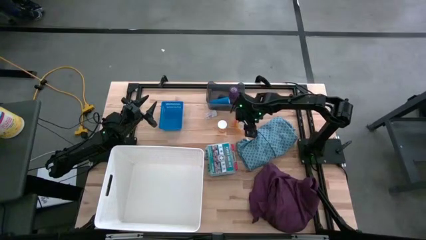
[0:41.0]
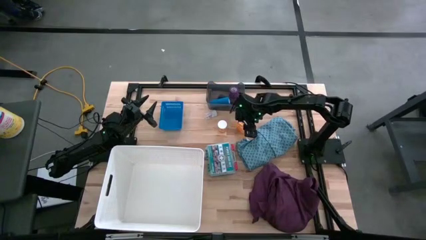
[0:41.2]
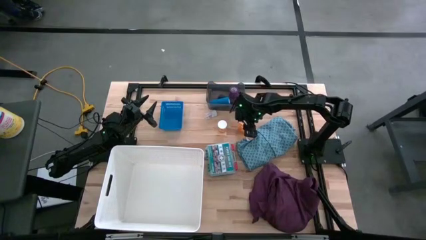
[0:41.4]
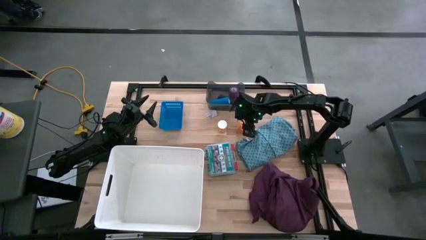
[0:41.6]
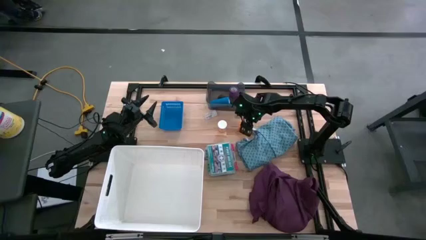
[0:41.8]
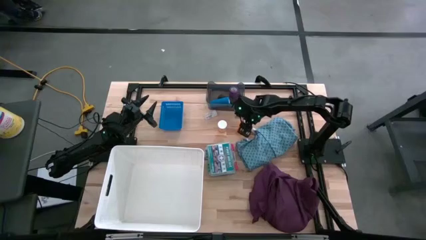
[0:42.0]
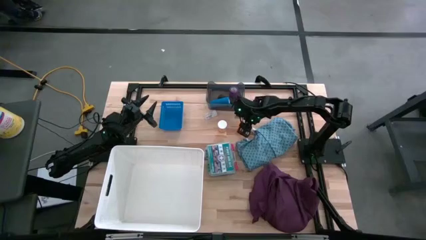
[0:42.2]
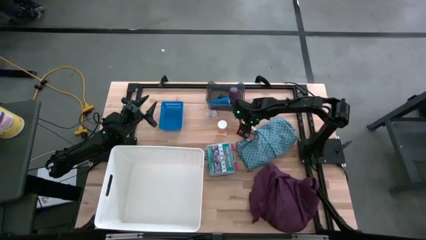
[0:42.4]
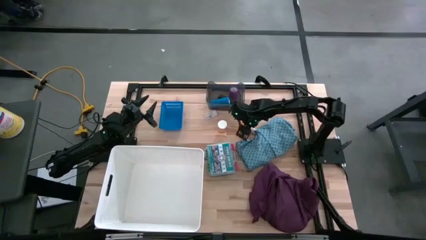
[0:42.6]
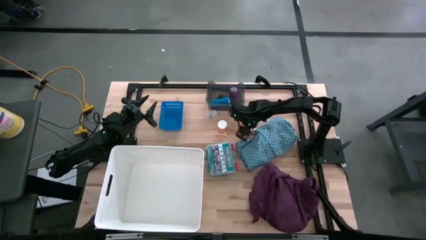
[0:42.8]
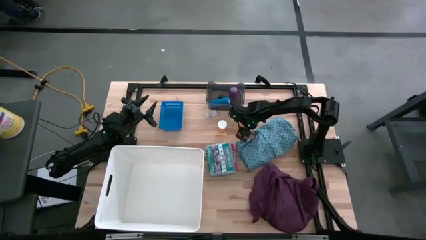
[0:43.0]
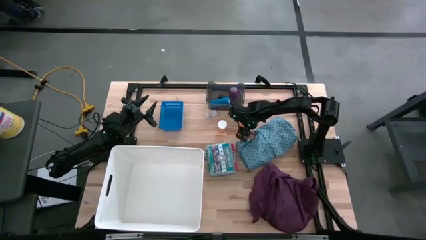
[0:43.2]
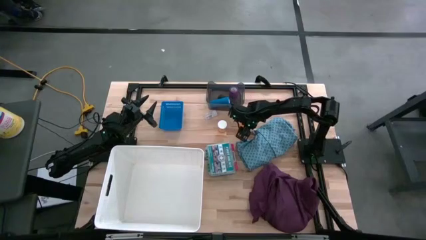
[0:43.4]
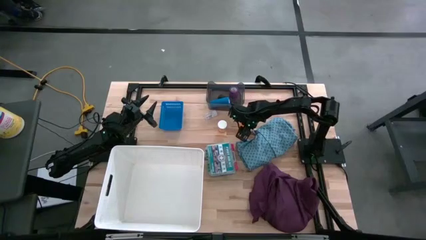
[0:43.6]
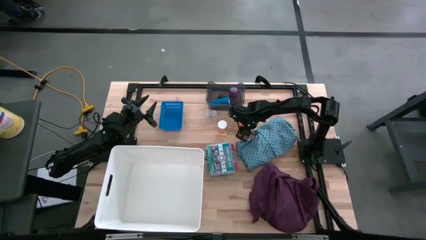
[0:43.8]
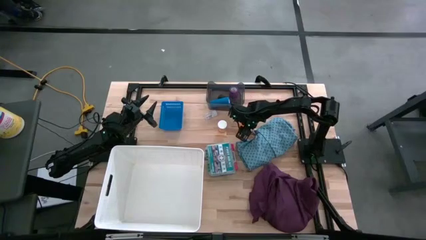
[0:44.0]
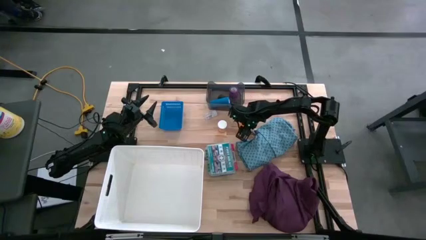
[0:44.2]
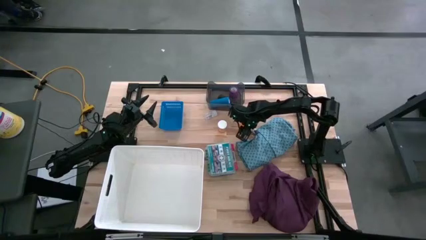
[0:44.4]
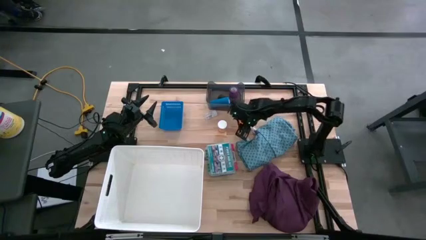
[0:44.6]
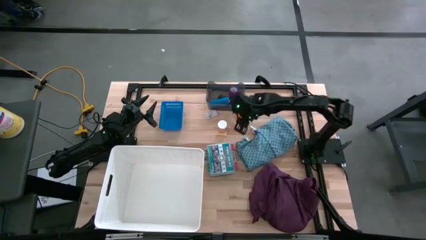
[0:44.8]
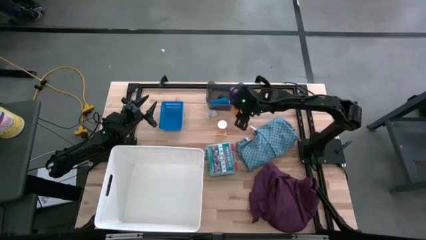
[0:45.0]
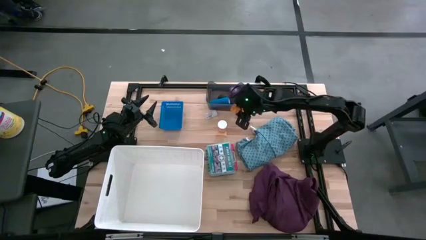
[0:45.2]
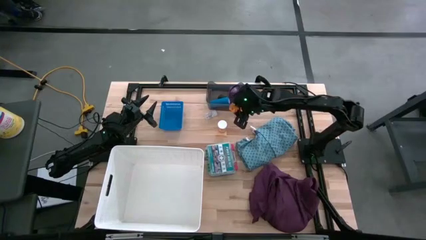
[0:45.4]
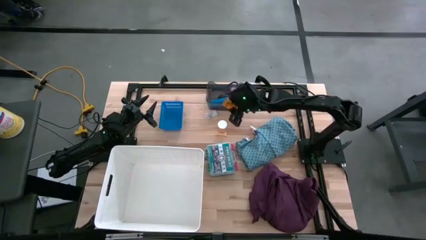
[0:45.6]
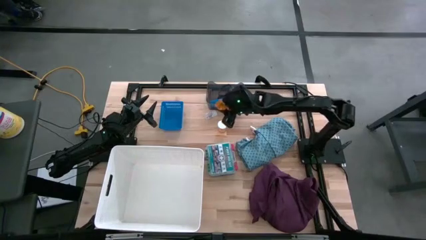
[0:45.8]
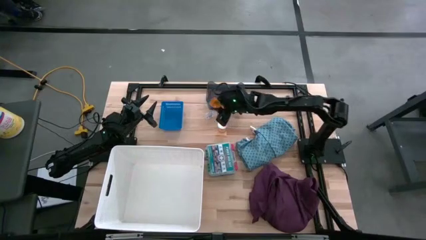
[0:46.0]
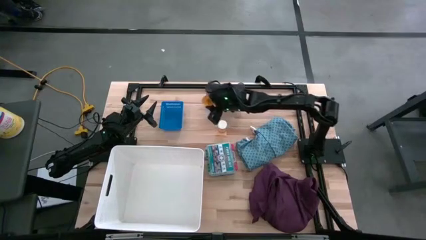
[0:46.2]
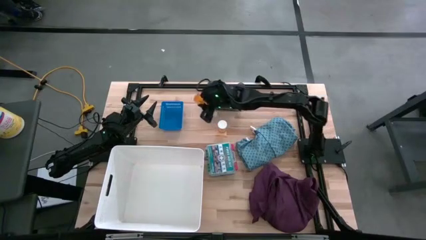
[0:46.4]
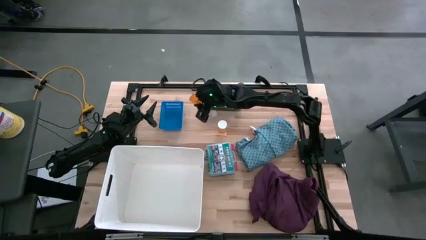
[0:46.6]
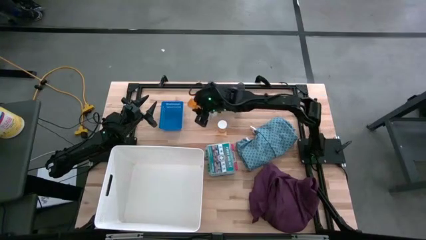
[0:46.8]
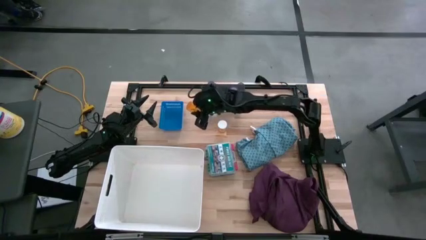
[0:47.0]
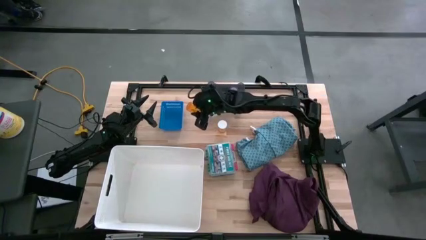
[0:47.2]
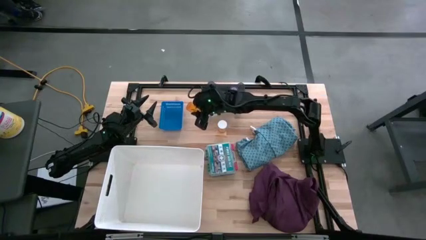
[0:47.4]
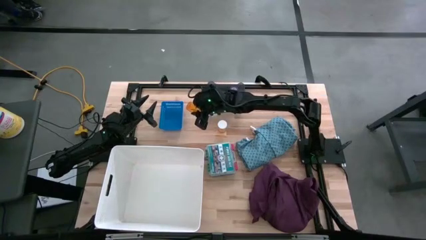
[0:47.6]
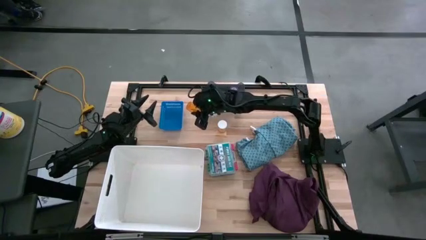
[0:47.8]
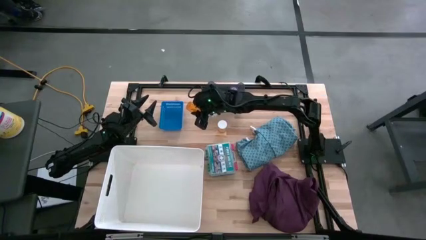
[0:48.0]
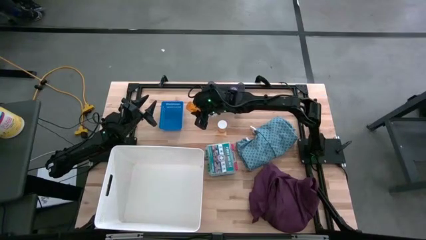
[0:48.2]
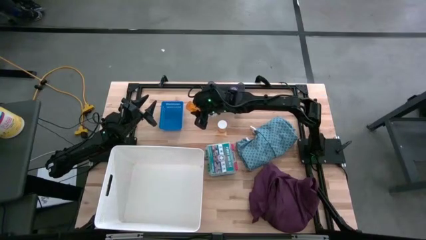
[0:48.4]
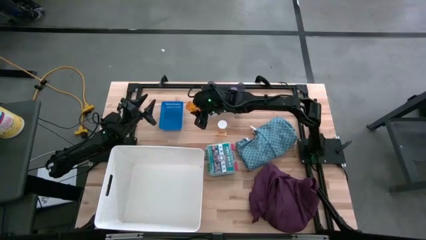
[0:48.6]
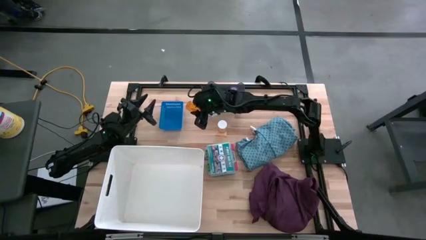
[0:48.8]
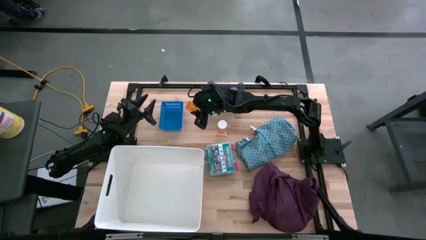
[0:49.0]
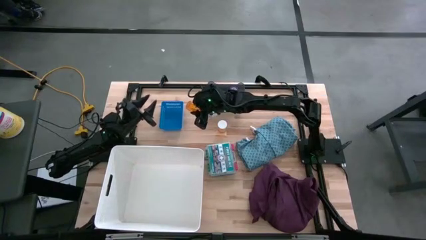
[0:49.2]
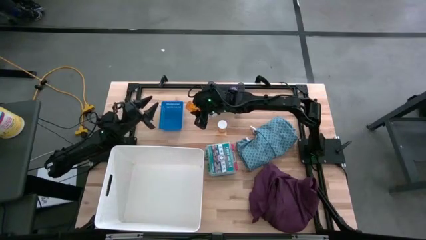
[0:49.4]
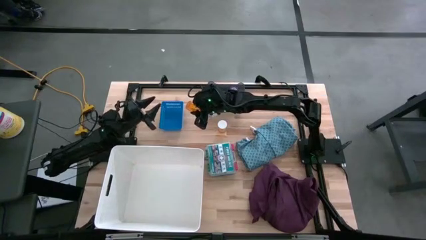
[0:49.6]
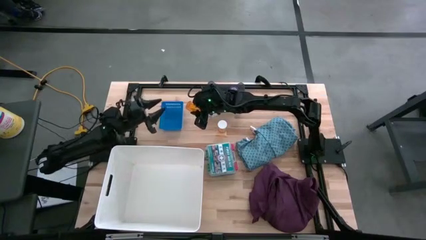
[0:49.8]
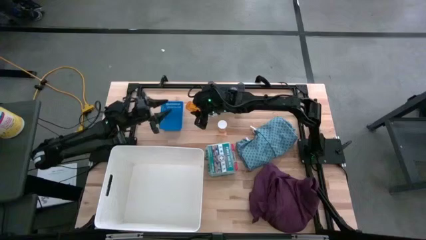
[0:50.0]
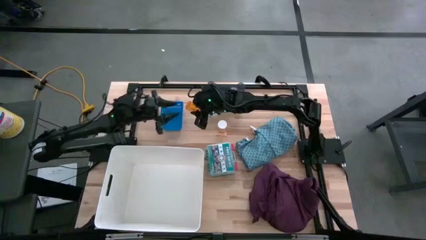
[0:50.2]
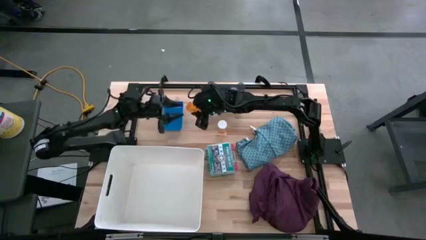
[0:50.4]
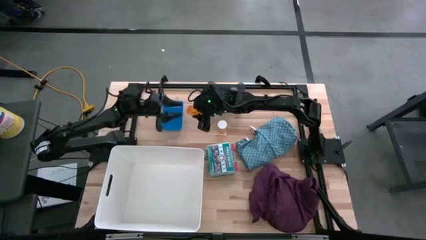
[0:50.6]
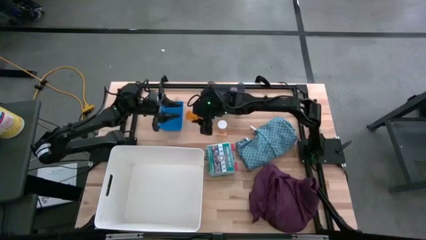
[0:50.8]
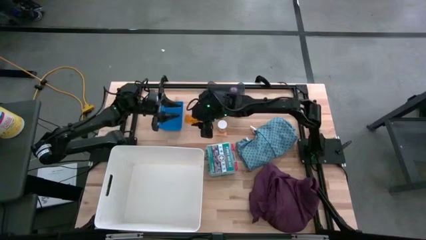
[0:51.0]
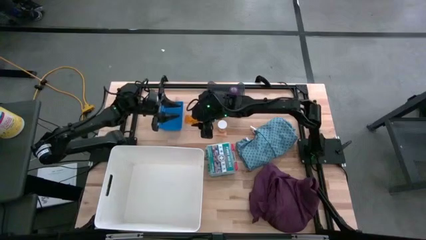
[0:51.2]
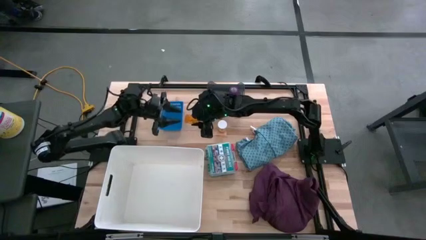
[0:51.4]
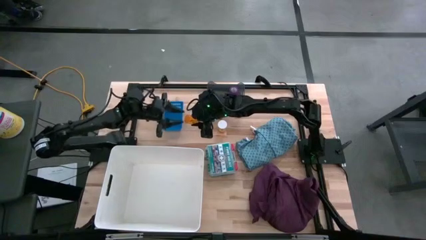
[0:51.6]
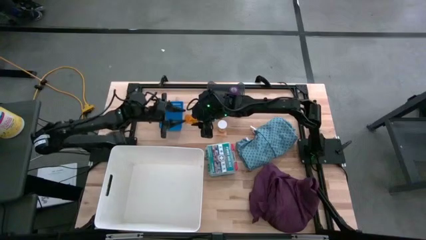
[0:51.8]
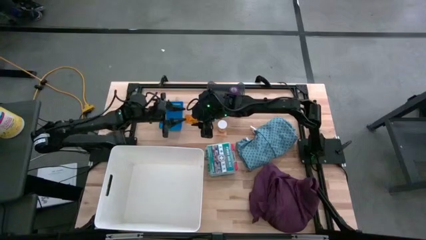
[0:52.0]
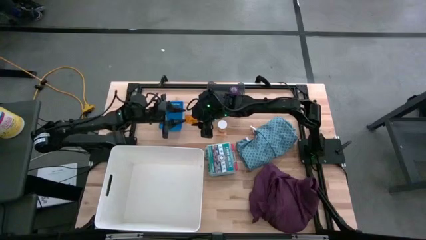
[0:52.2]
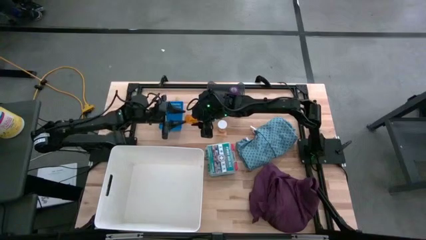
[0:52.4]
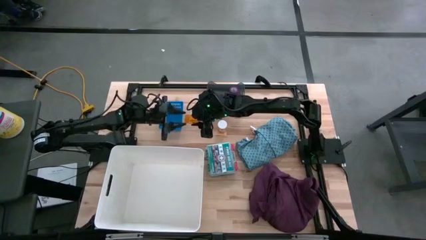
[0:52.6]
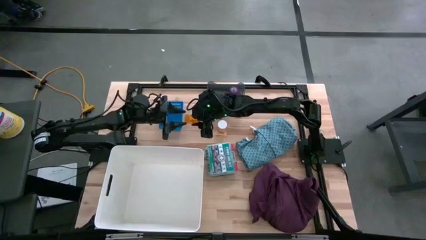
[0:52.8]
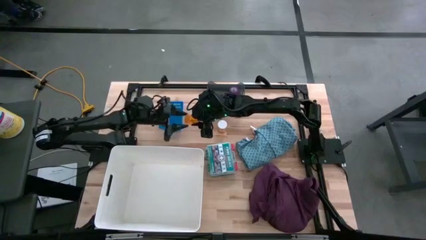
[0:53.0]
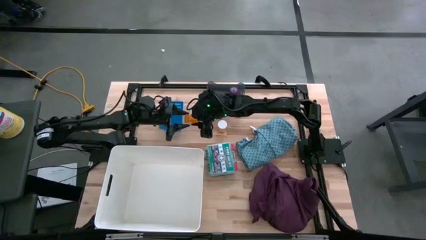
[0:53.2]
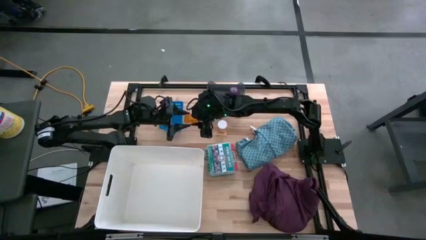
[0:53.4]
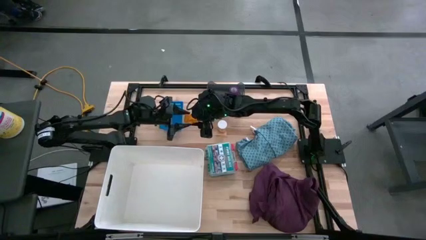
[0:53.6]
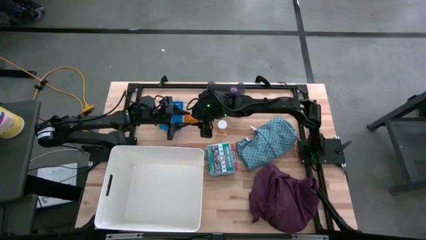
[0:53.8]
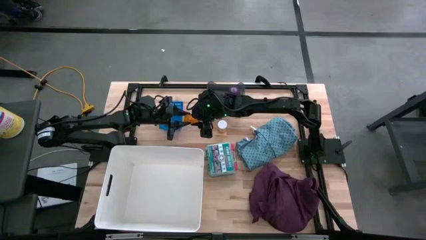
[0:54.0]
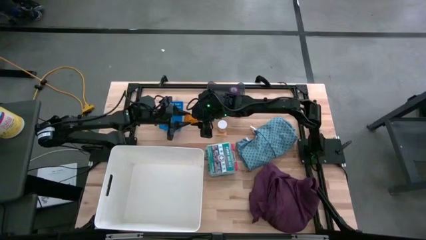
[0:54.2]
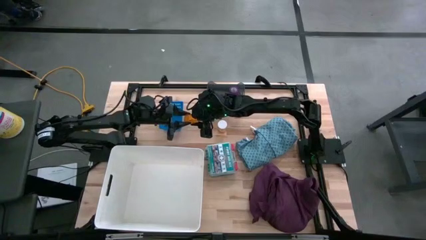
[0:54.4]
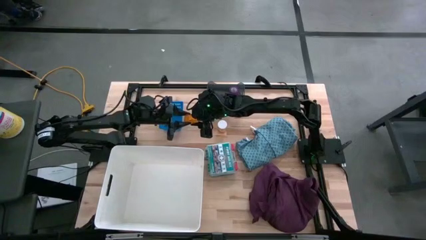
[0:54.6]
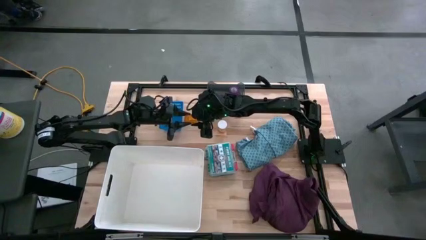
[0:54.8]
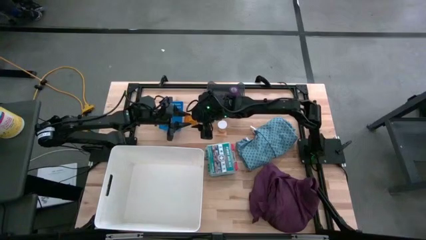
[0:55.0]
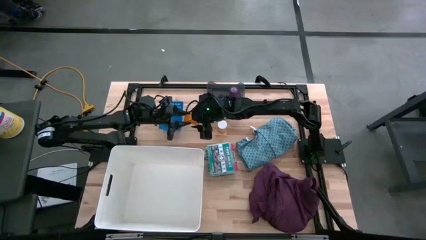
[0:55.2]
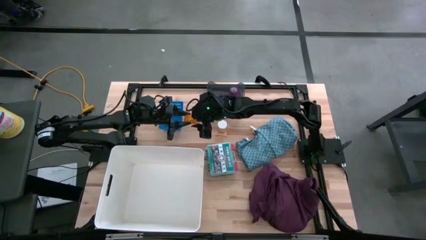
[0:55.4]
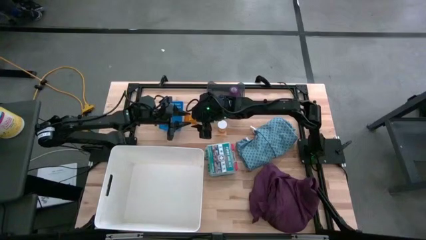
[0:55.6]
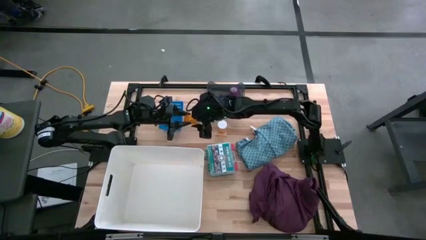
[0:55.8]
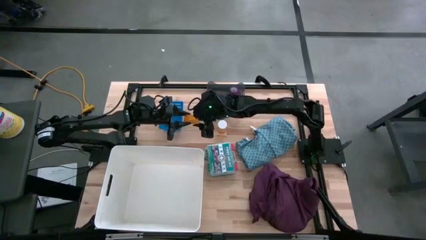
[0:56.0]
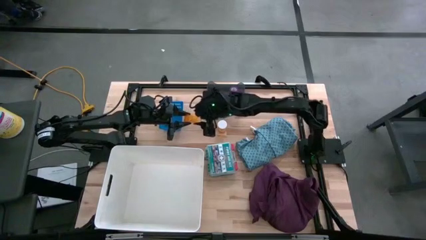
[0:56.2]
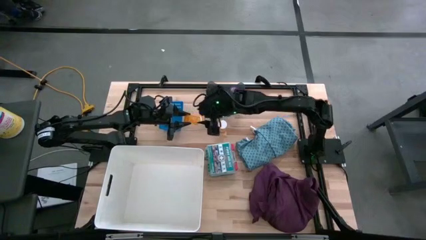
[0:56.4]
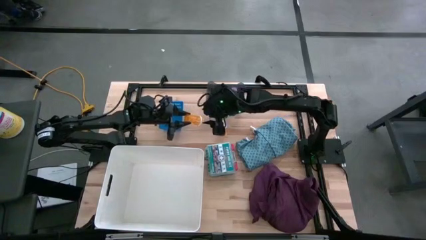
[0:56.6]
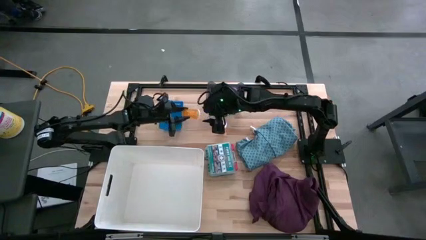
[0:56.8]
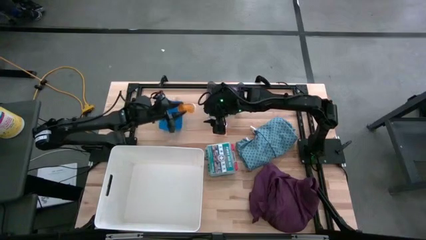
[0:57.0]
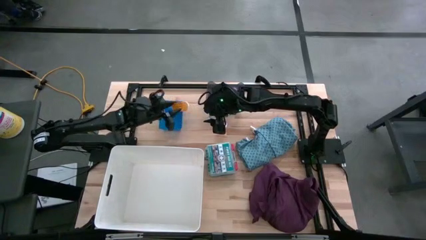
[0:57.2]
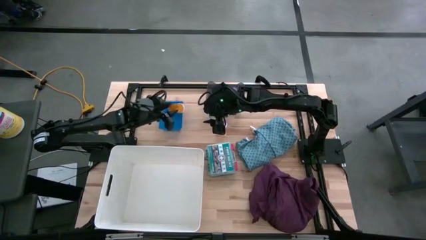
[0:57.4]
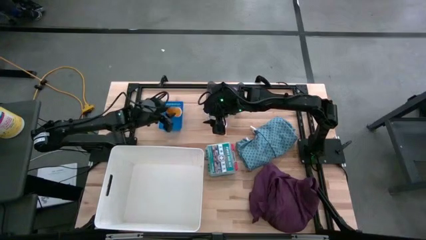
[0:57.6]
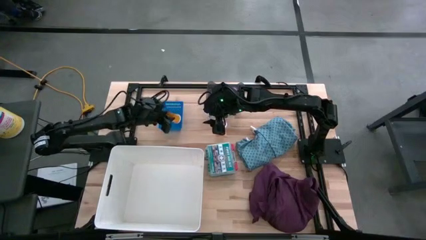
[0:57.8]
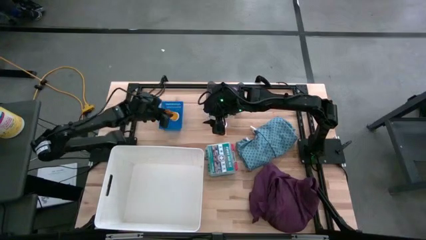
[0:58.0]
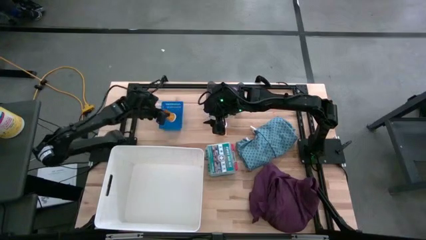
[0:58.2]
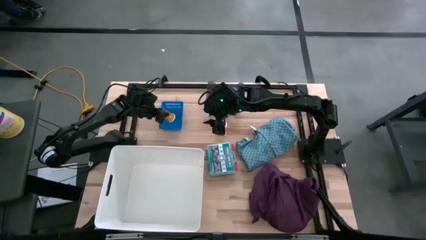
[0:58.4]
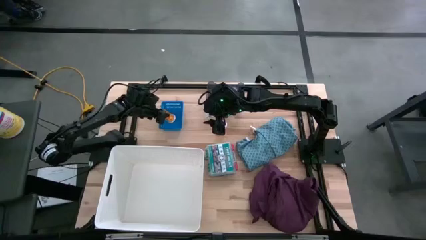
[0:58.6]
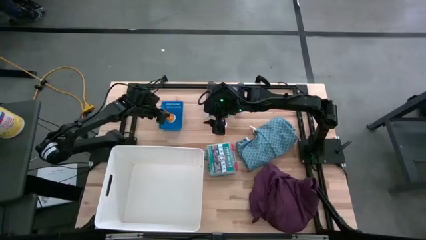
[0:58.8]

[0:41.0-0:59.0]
Task: Pick & place medical supplies in basket/bin
Put the orange pill bottle into the blue bin
